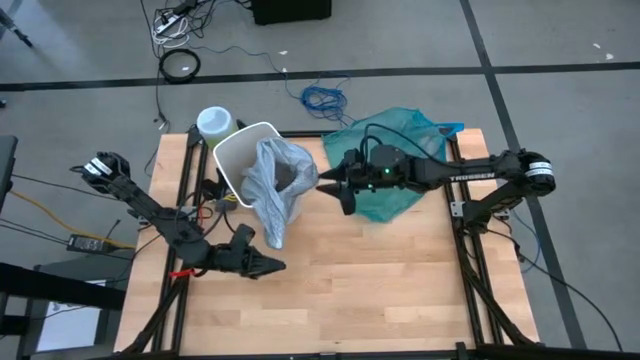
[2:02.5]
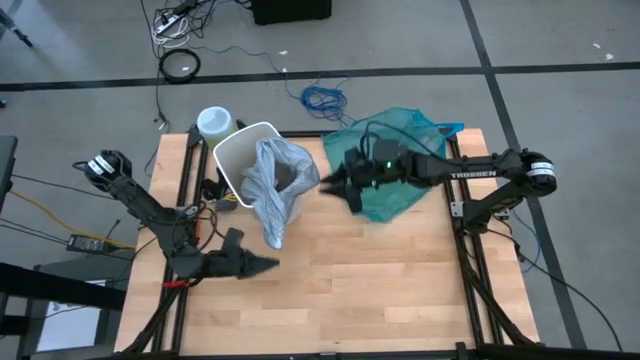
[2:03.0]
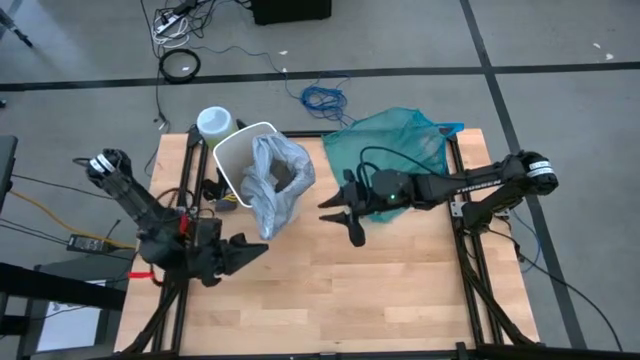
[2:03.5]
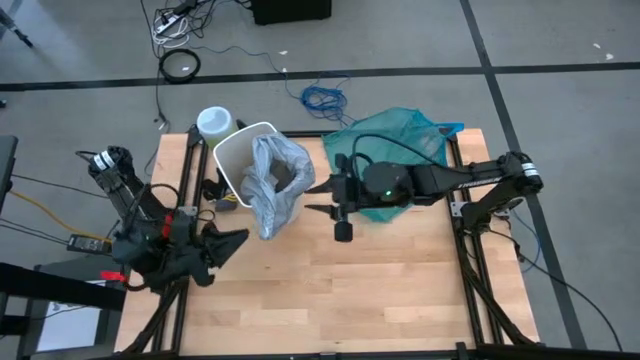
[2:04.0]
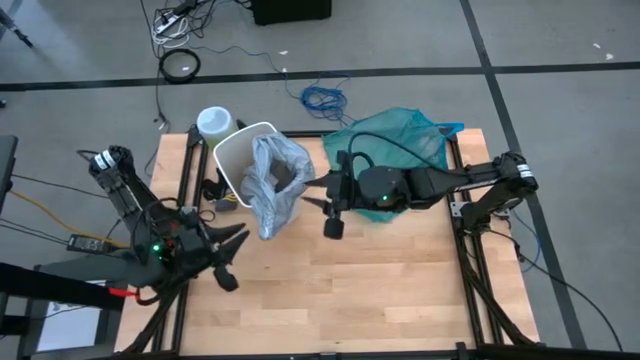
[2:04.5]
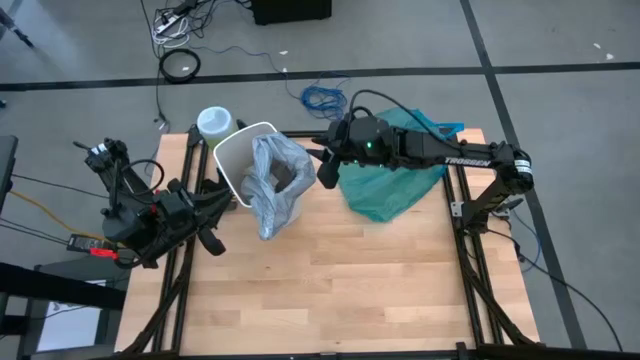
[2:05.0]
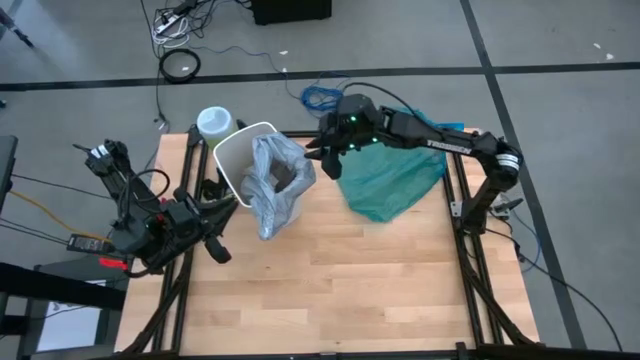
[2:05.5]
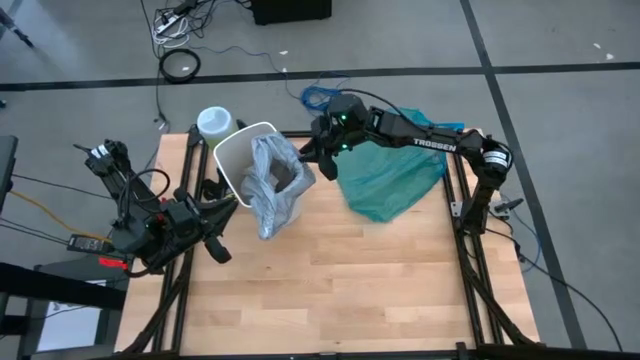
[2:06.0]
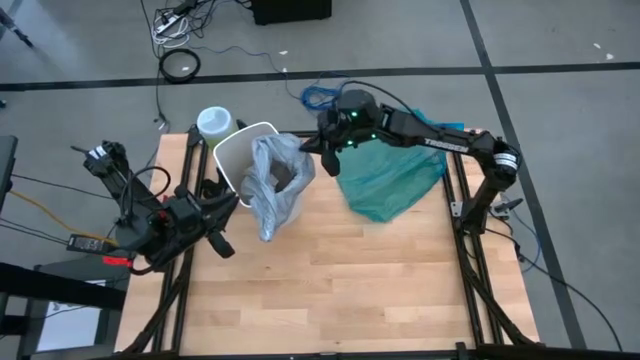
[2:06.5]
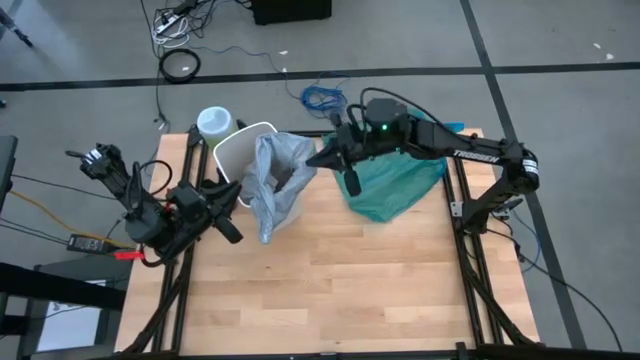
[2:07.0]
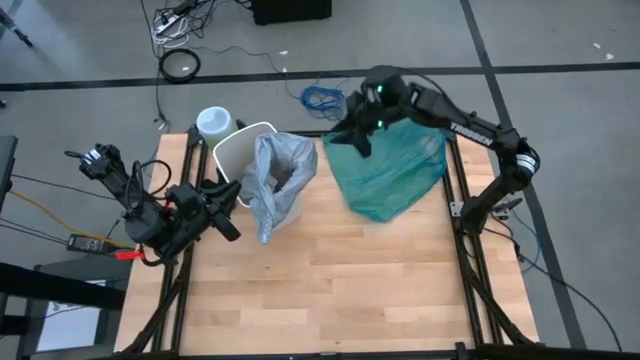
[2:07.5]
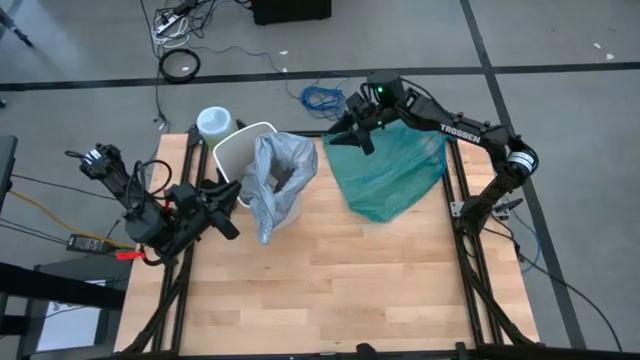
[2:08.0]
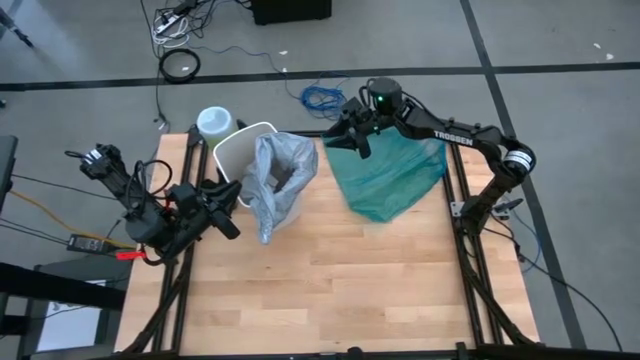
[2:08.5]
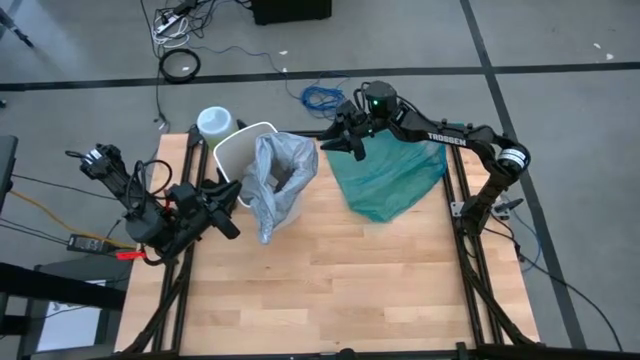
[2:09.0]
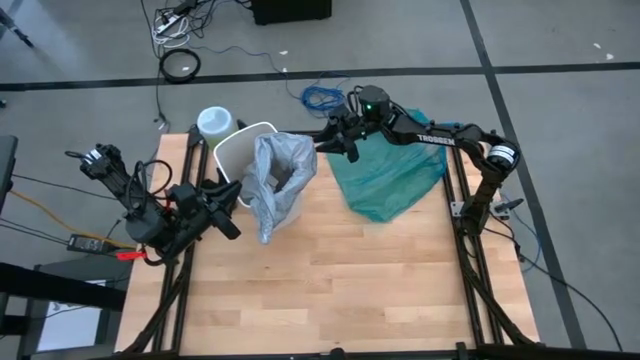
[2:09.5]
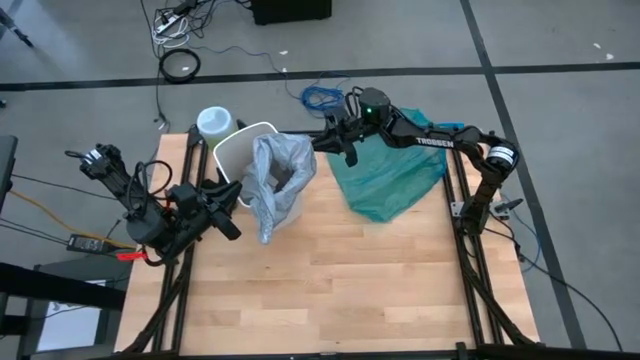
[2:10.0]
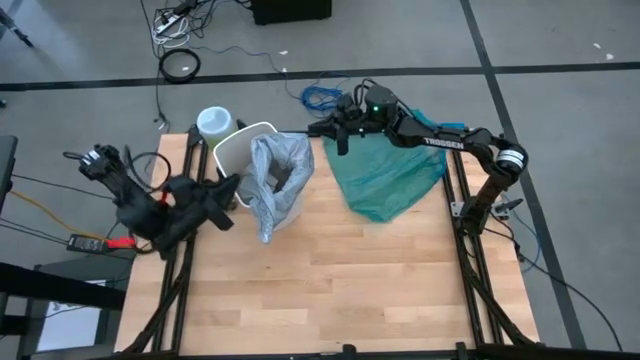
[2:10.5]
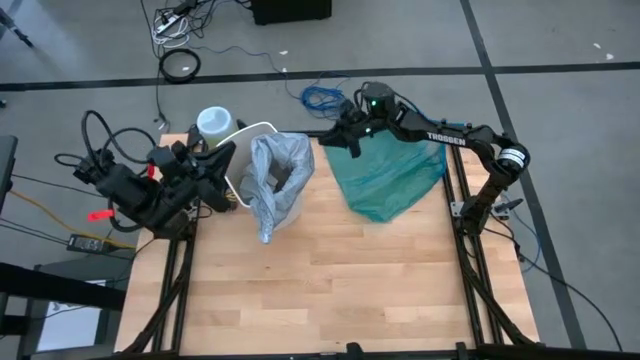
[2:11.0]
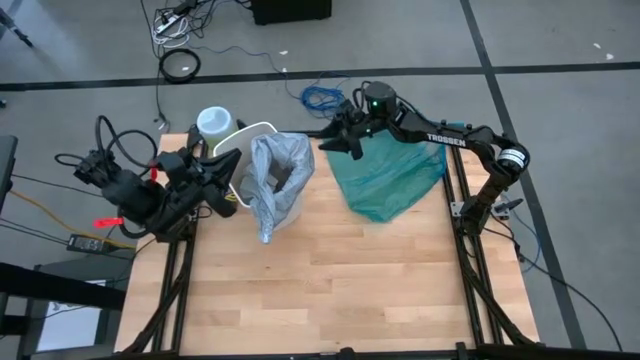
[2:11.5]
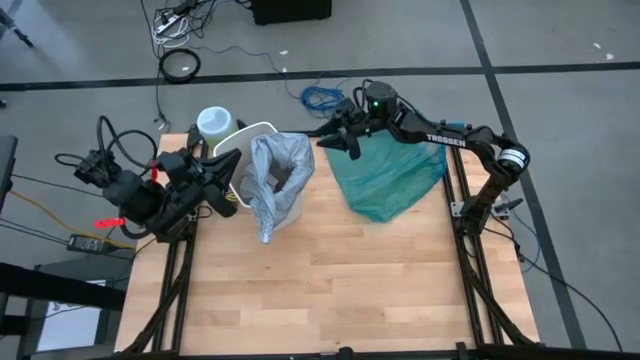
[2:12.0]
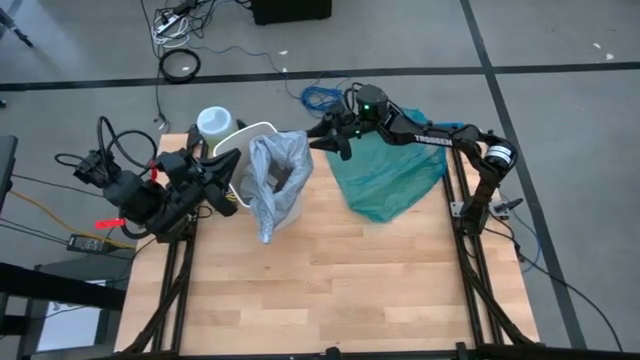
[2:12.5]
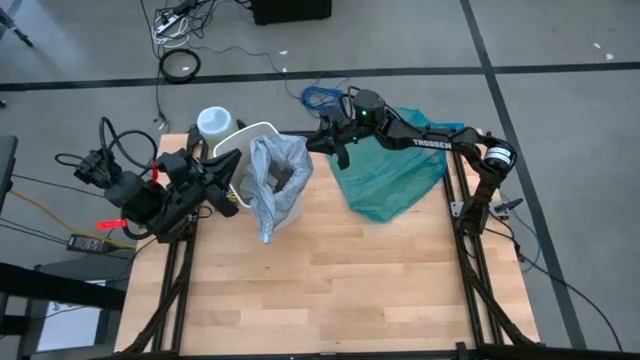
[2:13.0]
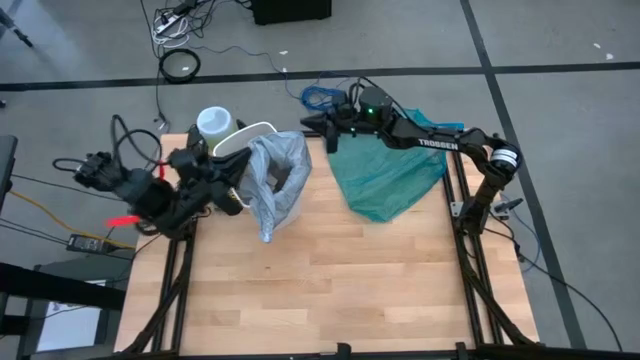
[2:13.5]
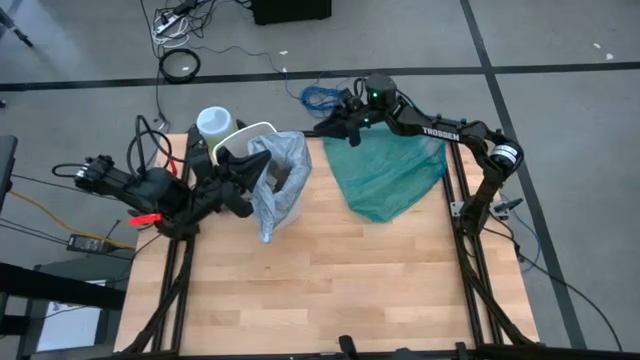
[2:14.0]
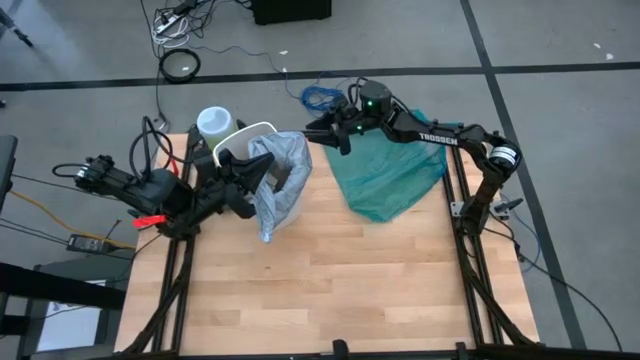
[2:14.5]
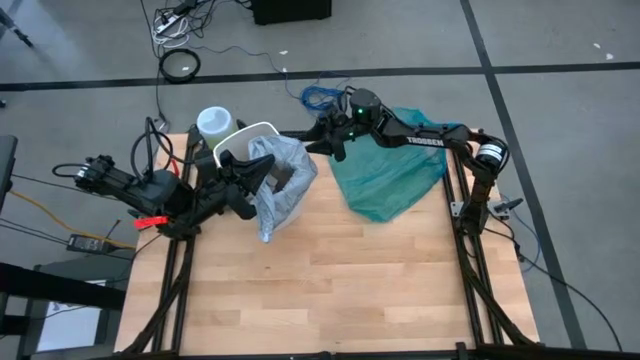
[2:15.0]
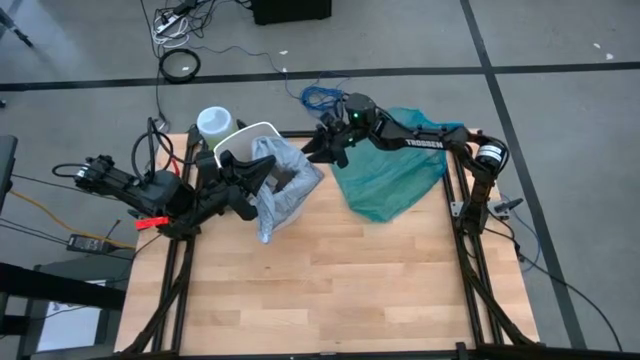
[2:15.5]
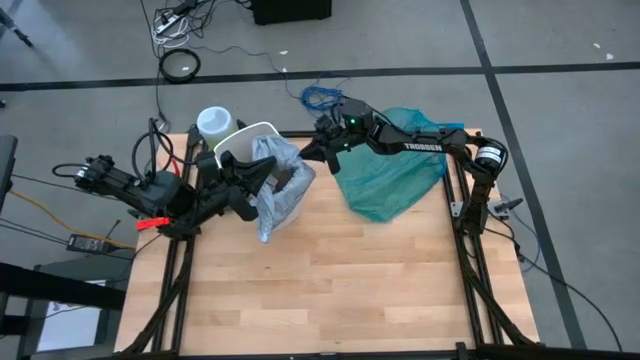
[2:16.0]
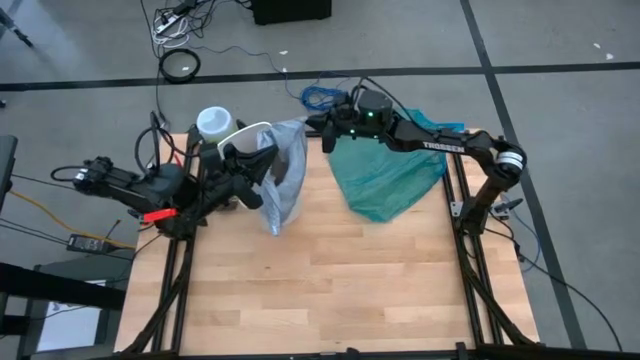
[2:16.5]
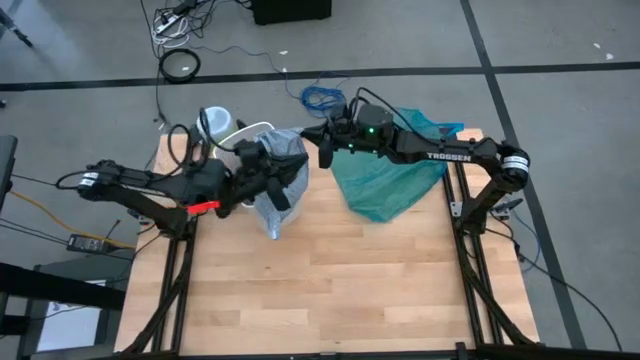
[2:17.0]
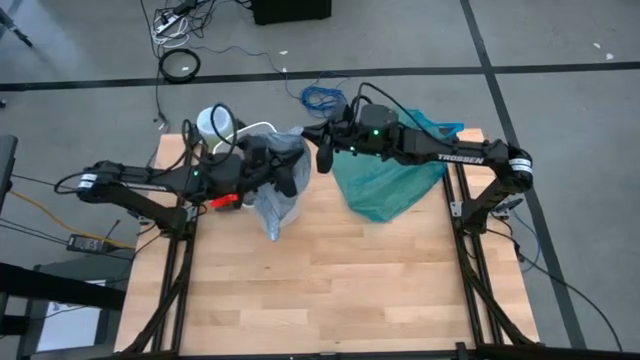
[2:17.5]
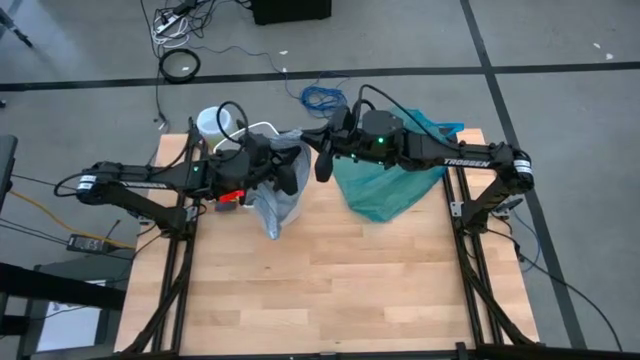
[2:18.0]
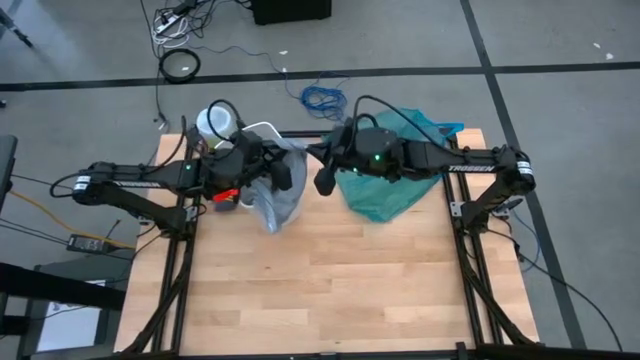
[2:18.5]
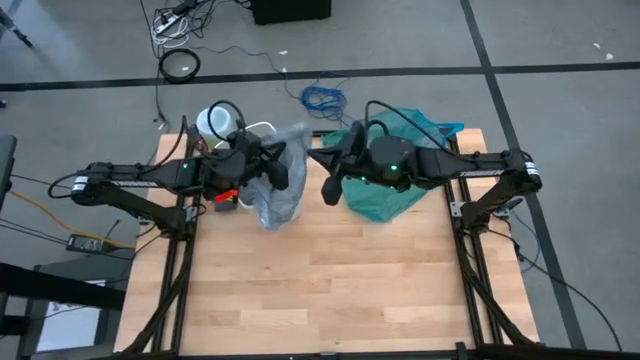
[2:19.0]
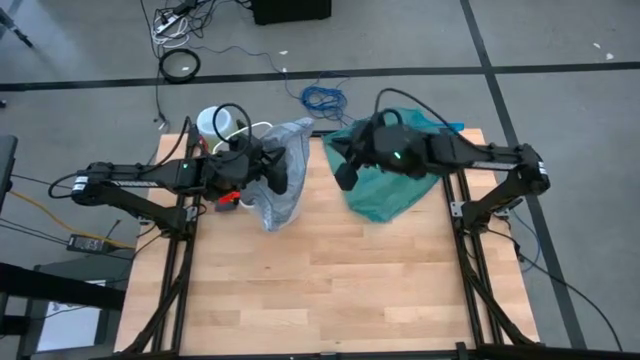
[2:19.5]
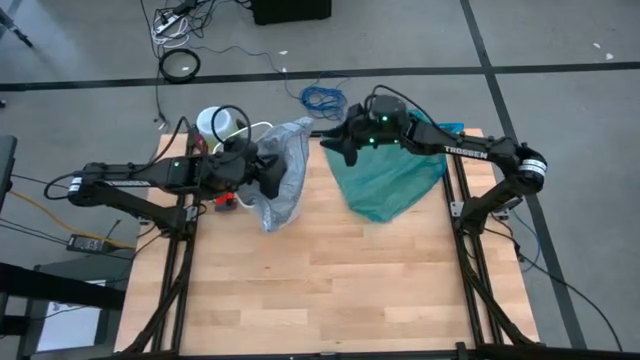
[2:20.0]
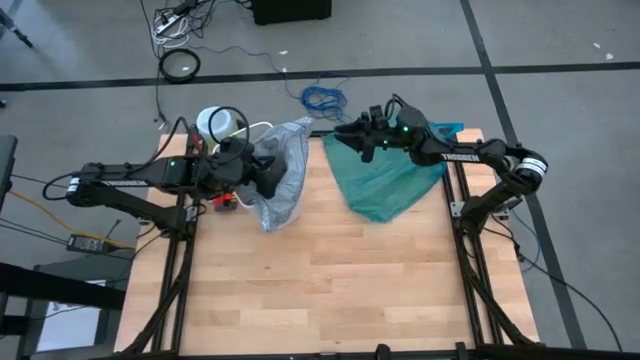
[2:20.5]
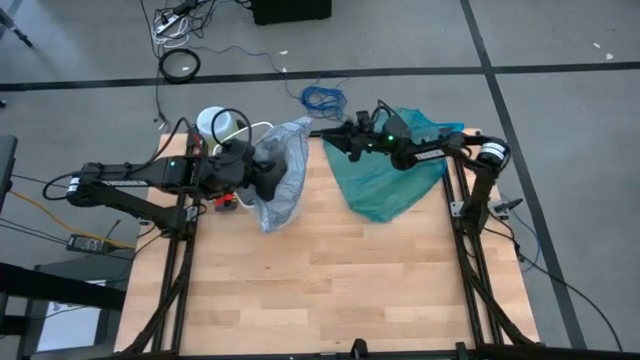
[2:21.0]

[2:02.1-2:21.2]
Task: place trash/remove bag and relplace
Remove the light blue trash bag from the trash bin
